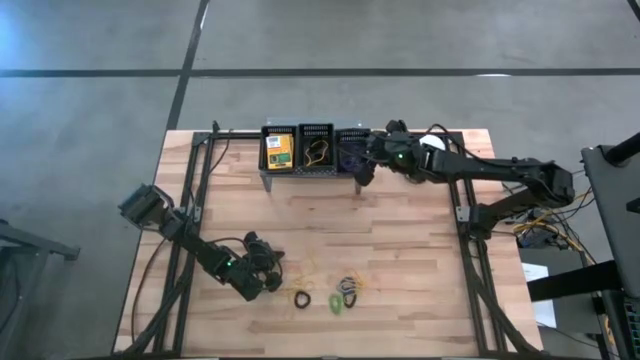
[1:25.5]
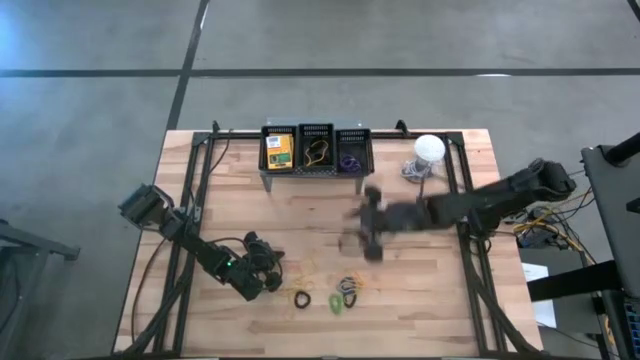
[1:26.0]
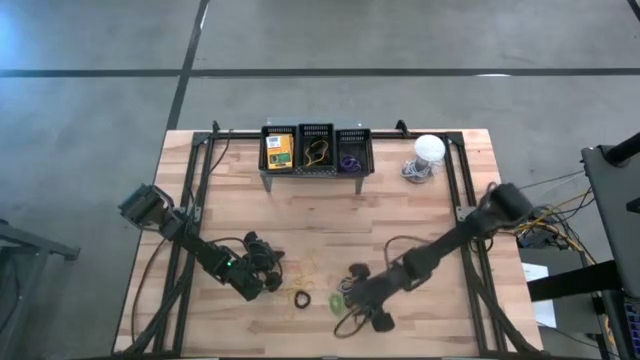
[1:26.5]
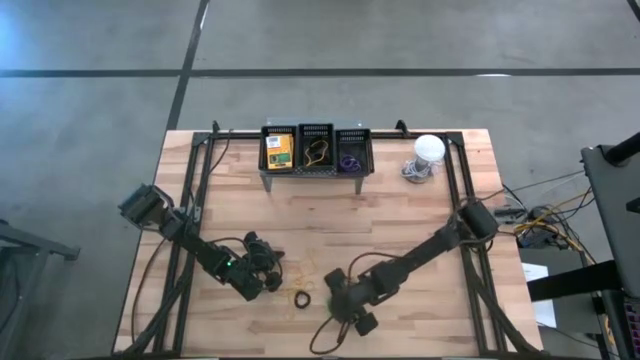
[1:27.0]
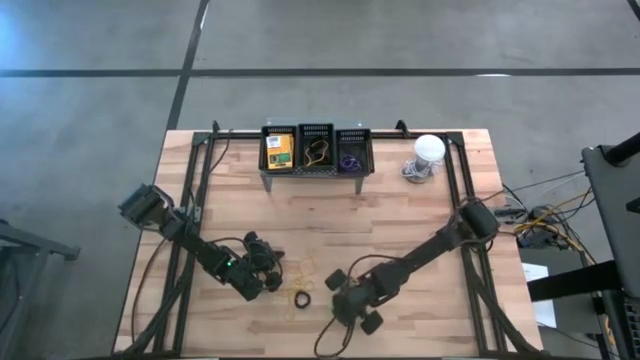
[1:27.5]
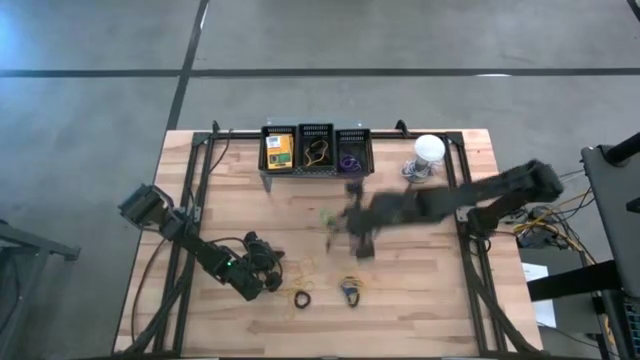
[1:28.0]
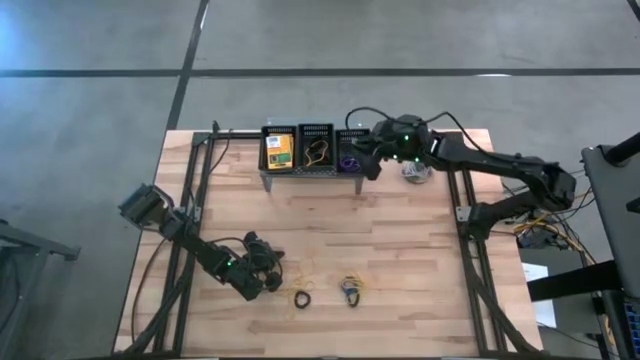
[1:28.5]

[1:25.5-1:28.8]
Task: Pick & Place Office Desk Supplies
Put the green spring keychain into the right black basket

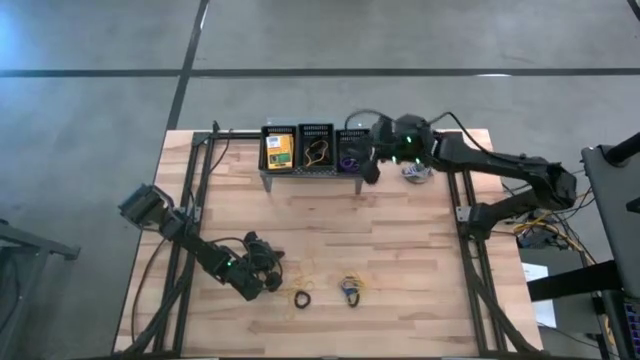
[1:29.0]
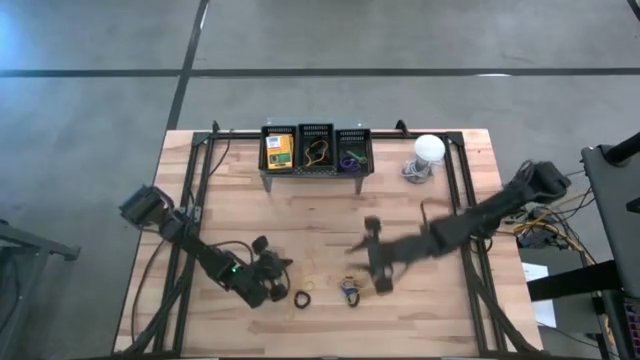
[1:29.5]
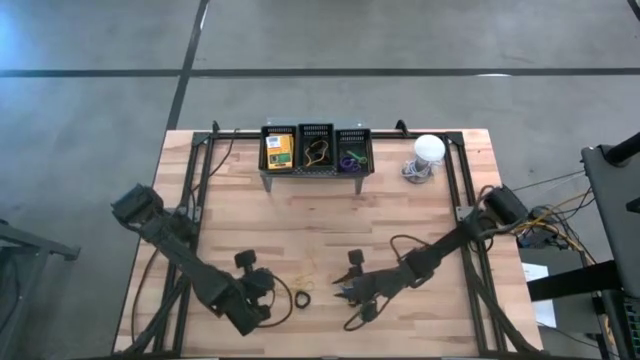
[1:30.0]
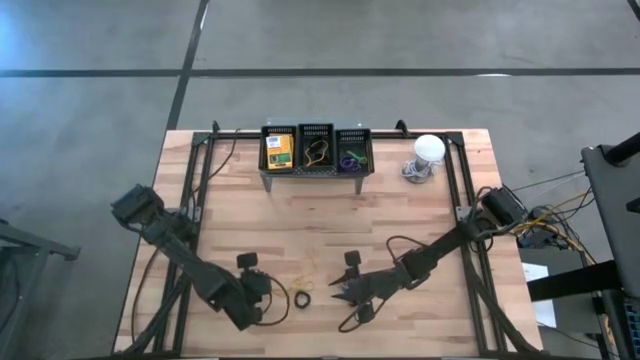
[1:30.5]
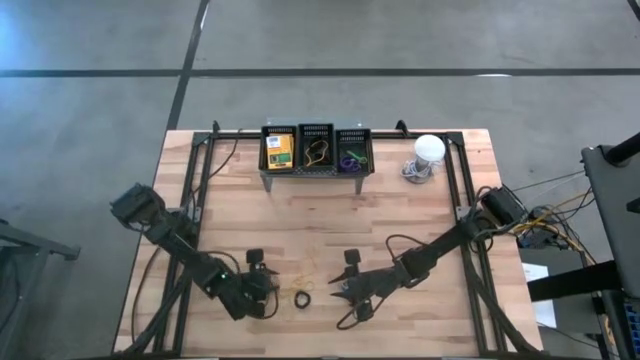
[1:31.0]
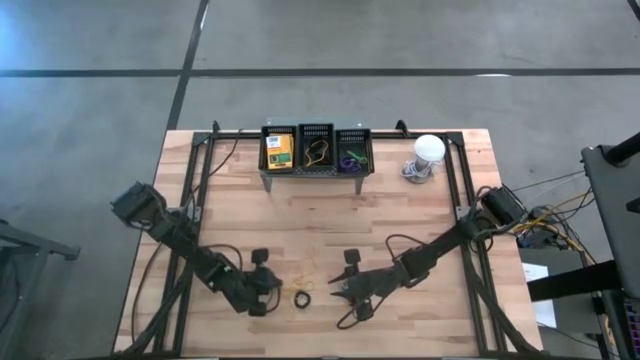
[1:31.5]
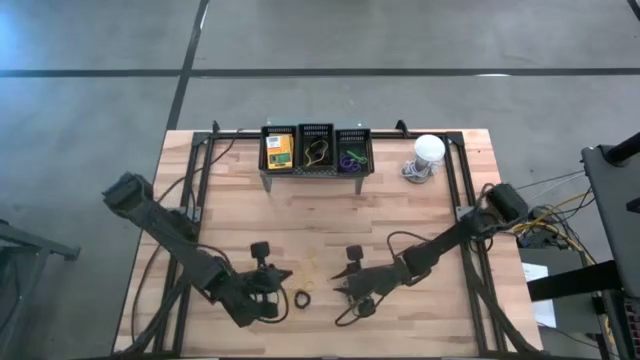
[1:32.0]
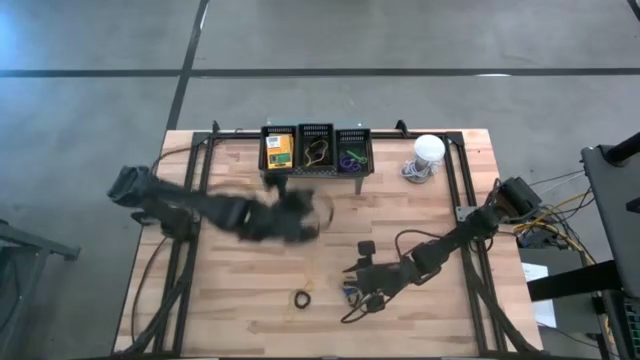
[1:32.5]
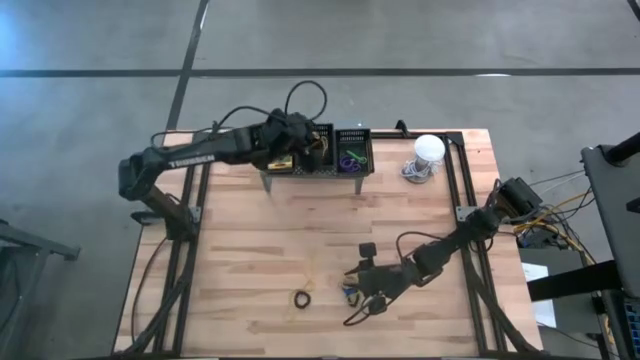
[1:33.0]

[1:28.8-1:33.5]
Put the yellow rubber band into the middle black basket

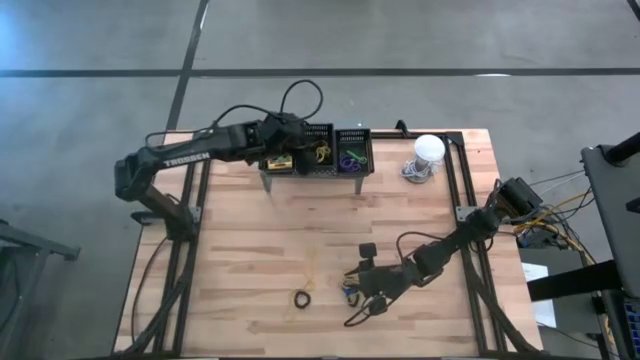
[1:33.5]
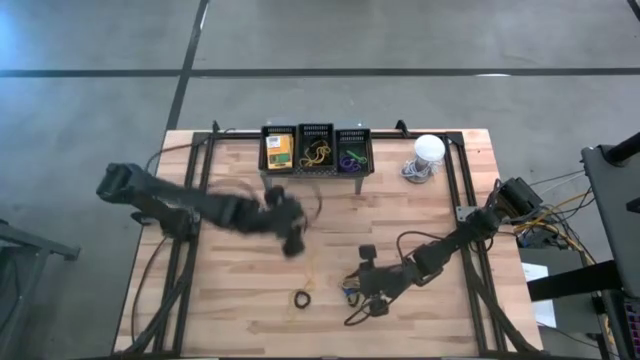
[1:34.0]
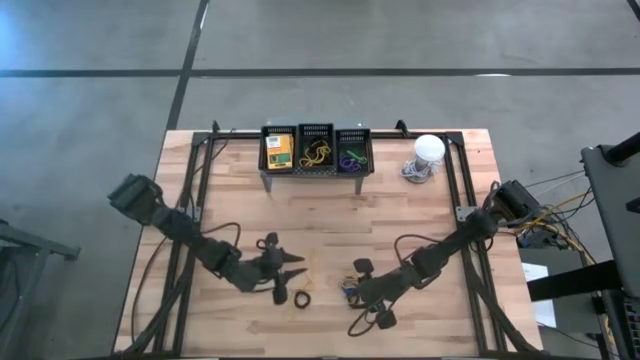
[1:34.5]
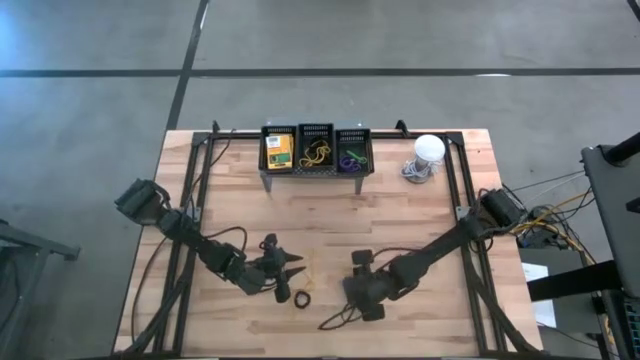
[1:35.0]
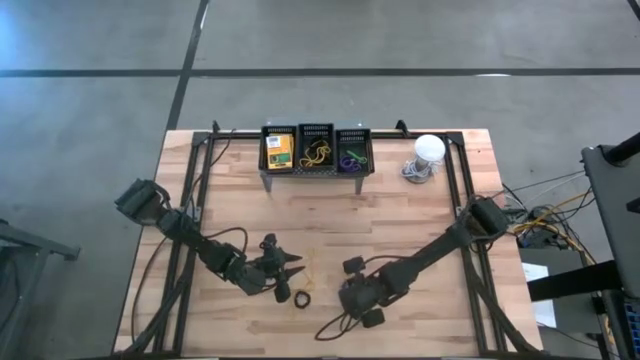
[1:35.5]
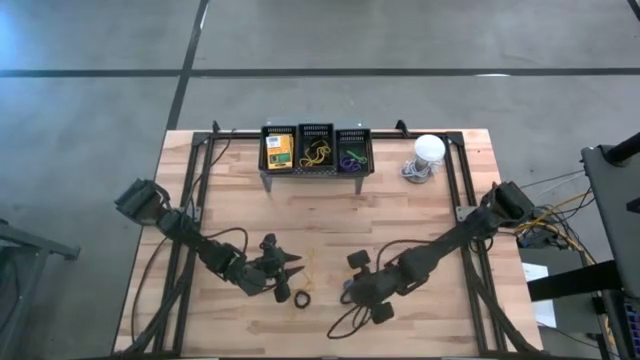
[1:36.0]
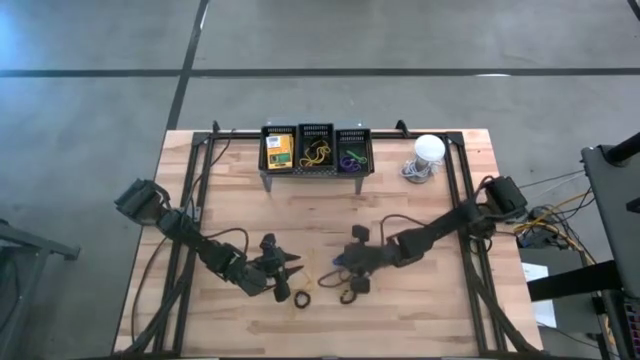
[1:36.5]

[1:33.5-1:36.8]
Put the blue spring keychain into the right black basket

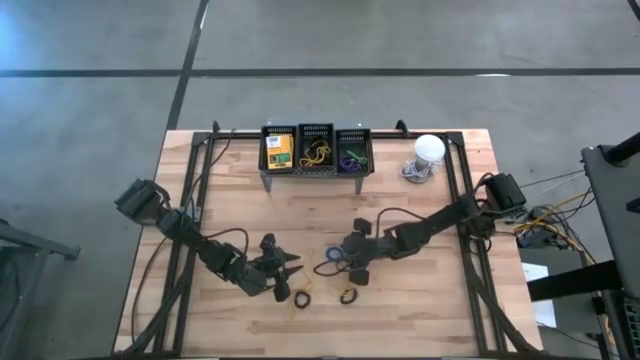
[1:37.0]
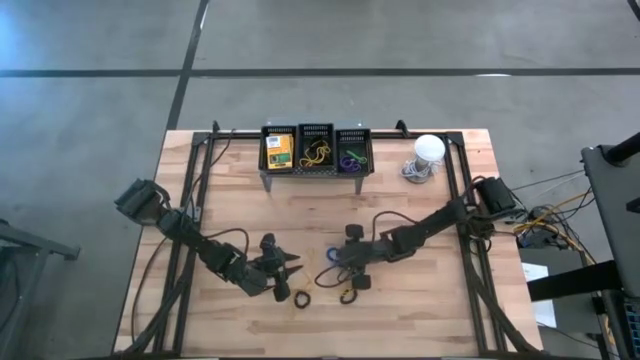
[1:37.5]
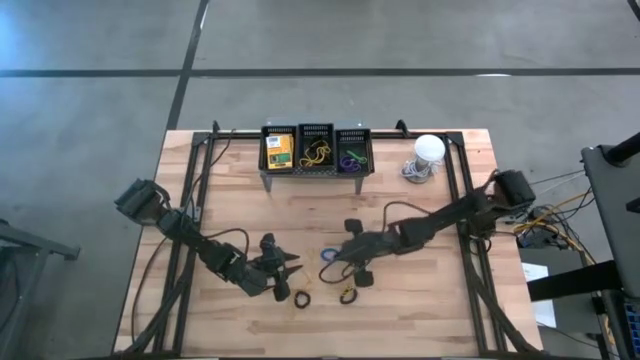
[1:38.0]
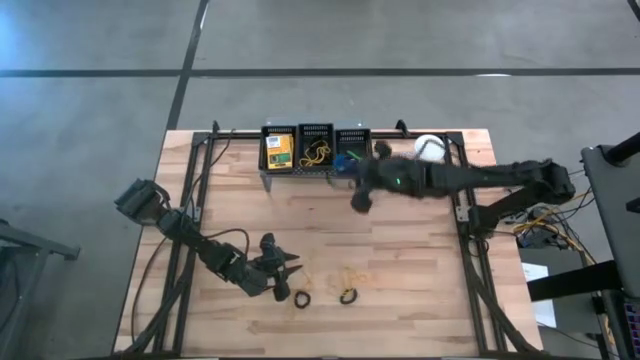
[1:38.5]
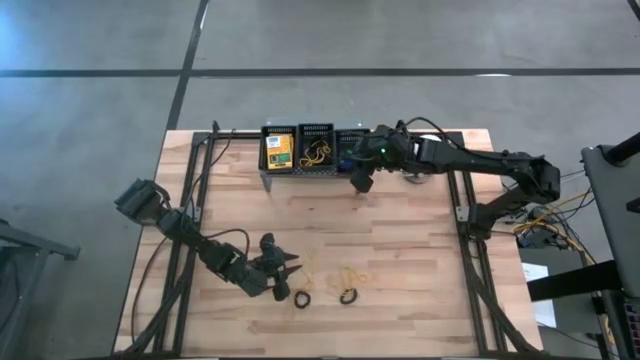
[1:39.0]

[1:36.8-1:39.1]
Put the blue spring keychain into the right black basket

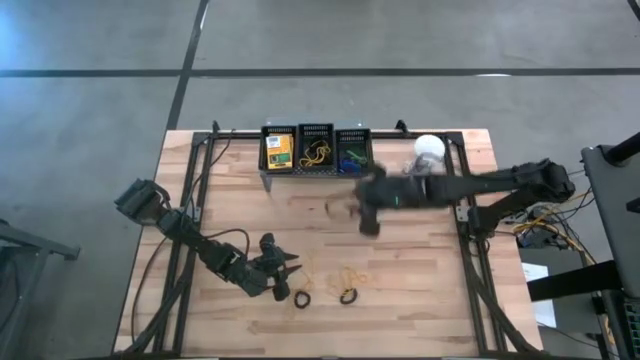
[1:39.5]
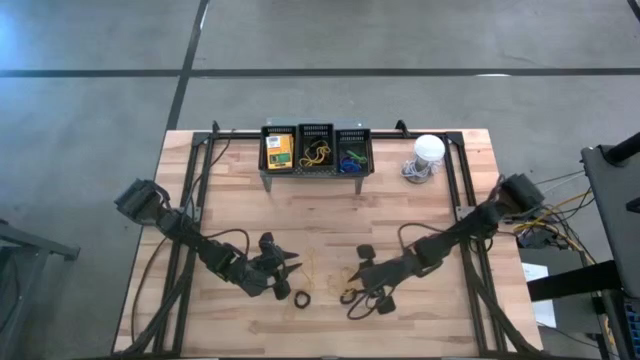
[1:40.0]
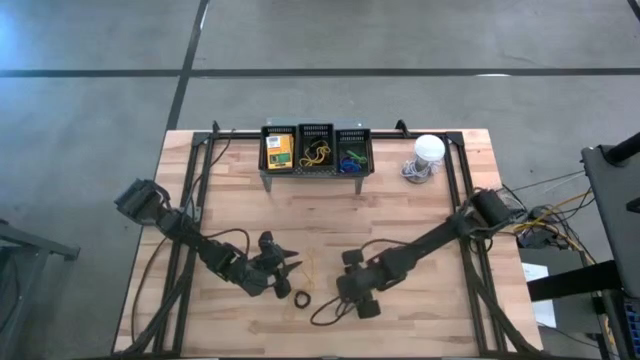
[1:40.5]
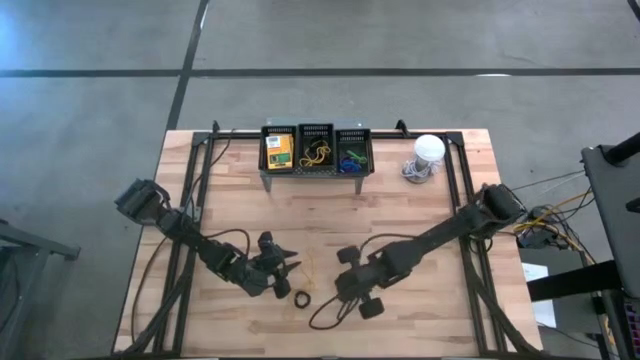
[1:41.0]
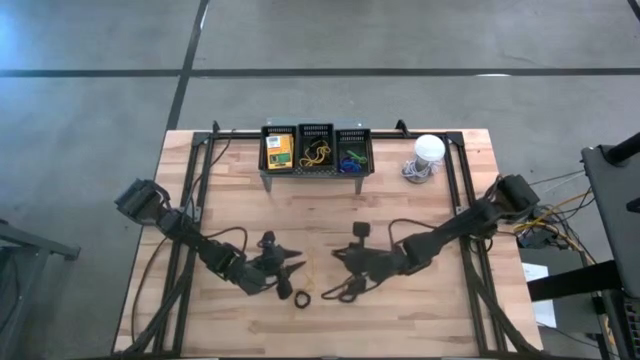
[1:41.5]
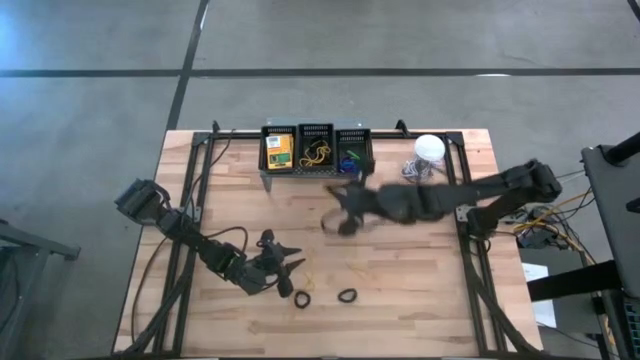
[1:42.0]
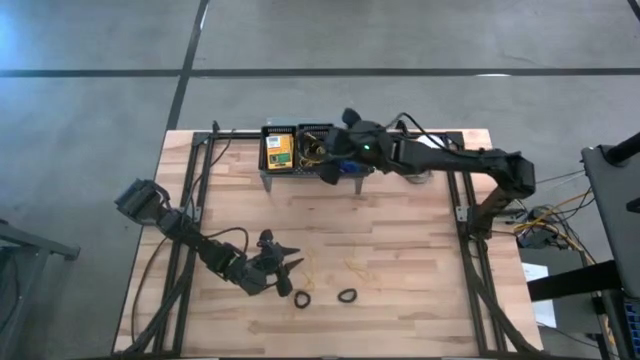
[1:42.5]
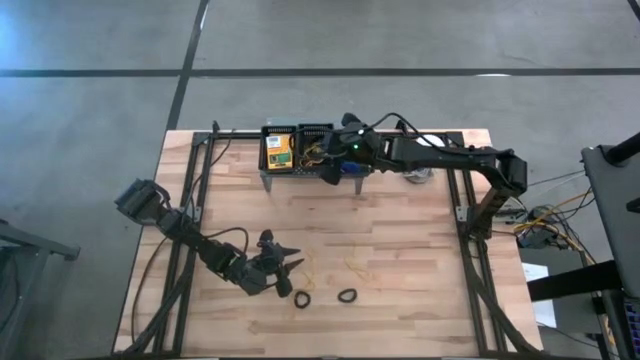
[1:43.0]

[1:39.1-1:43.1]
Put the yellow rubber band into the middle black basket

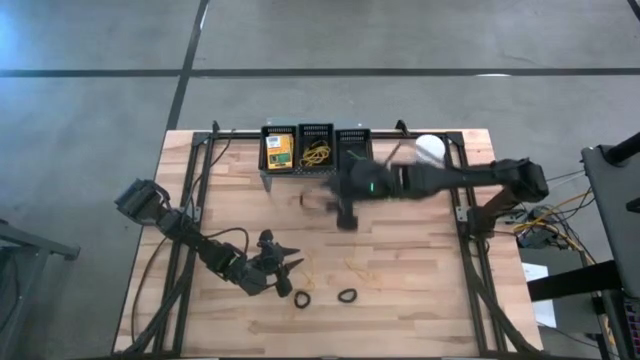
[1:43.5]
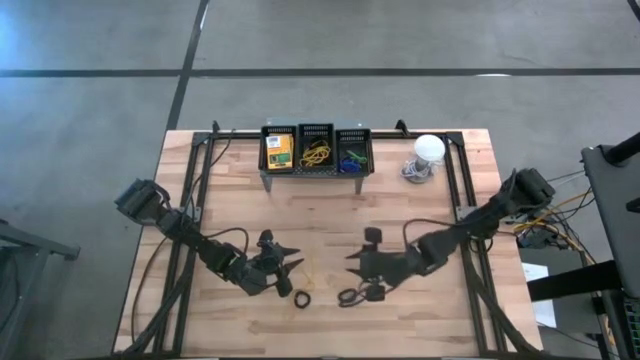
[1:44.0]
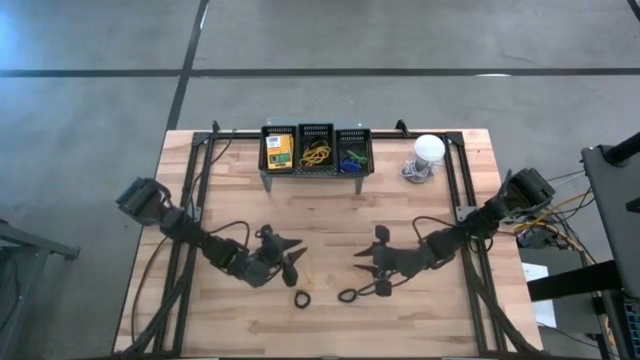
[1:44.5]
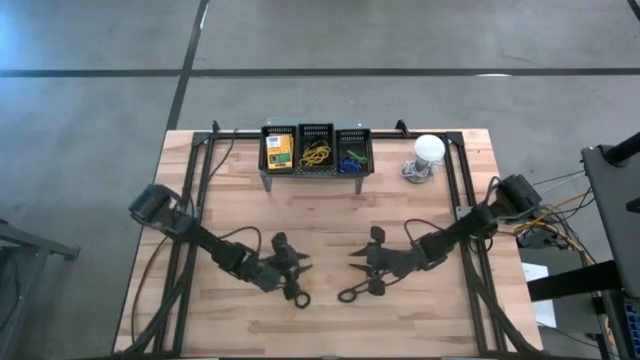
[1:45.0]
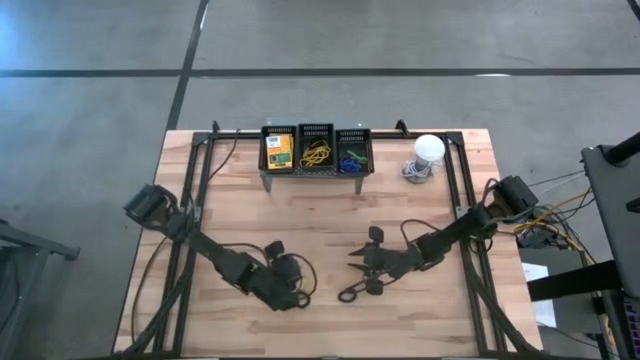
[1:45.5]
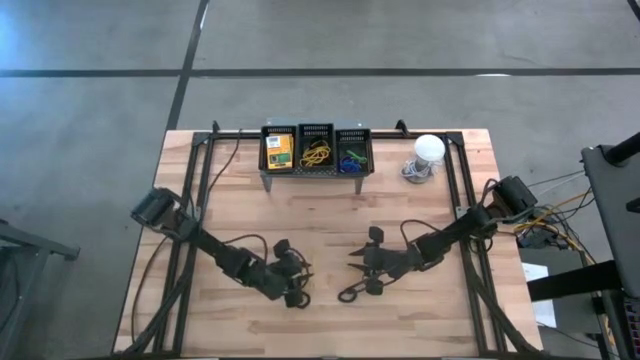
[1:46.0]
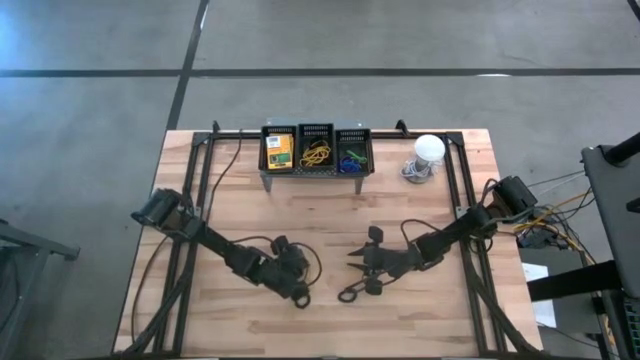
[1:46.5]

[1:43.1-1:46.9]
Put the yellow rubber band into the middle black basket

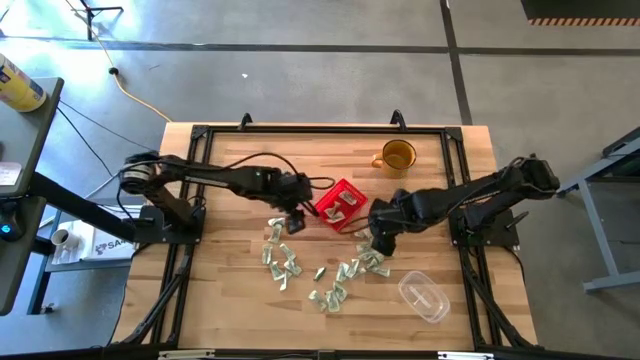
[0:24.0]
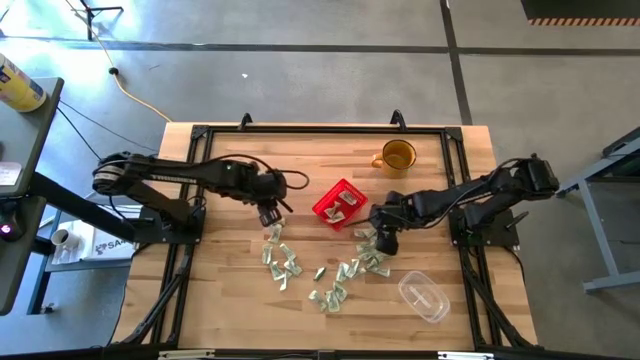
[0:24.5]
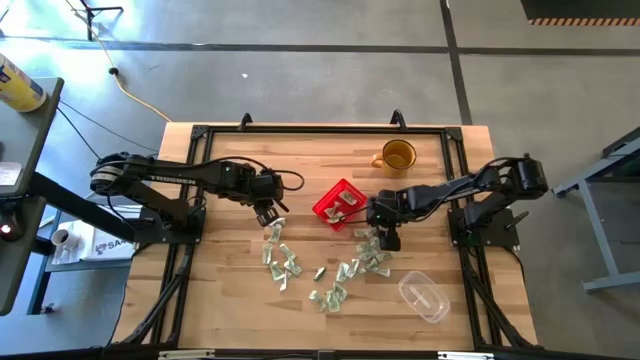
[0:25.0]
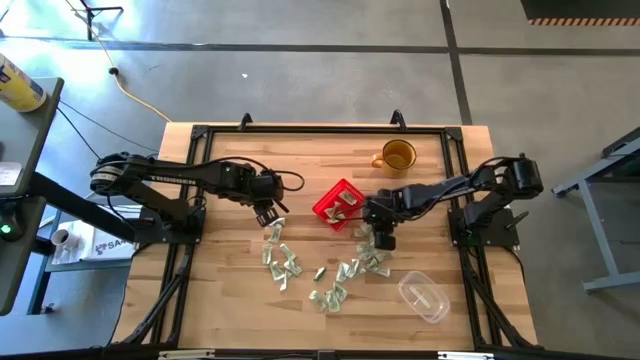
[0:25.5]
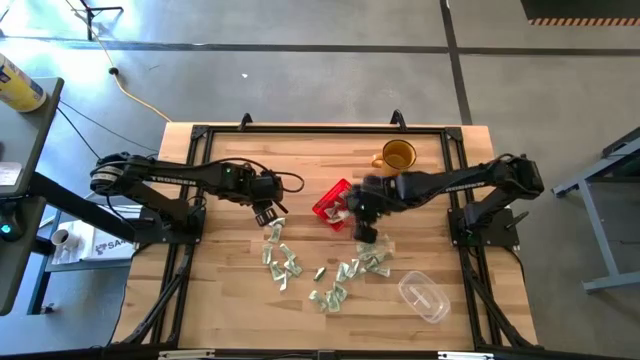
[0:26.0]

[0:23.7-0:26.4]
Task: Pick and place items into bin
Put the white stevia packet into the red bin
